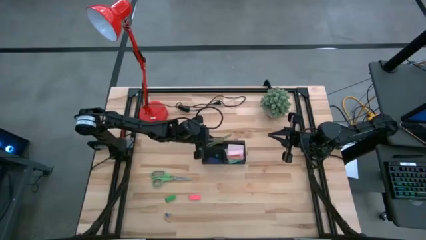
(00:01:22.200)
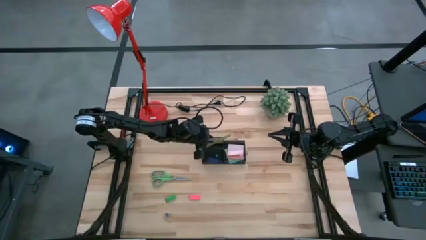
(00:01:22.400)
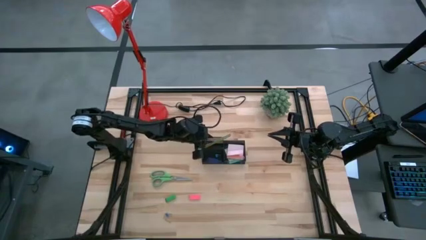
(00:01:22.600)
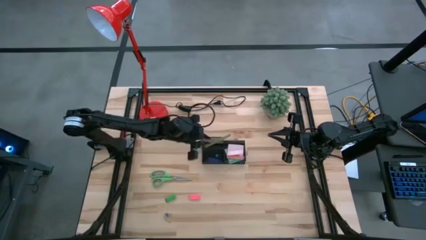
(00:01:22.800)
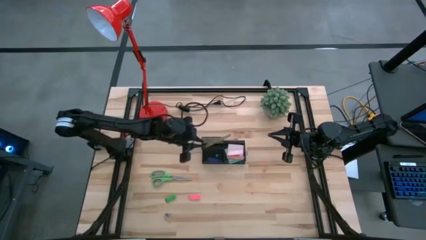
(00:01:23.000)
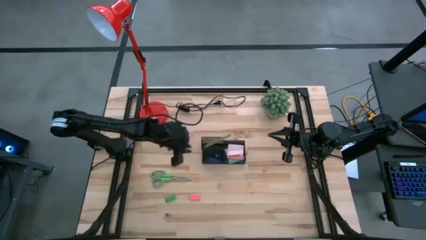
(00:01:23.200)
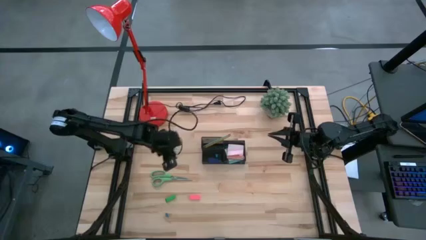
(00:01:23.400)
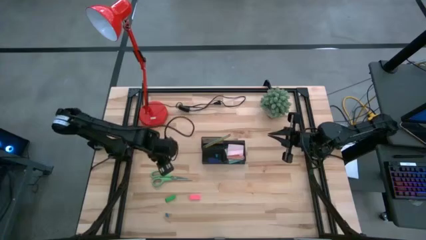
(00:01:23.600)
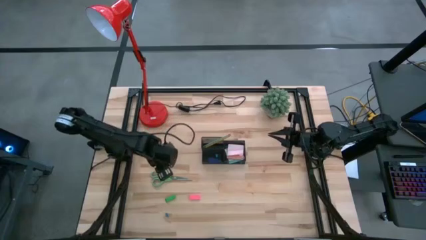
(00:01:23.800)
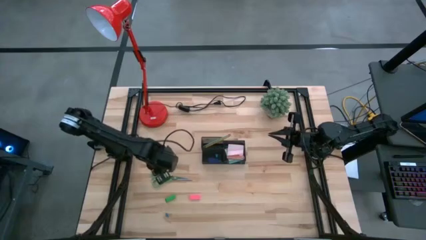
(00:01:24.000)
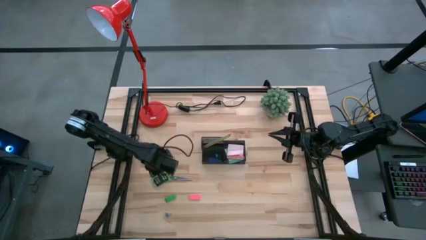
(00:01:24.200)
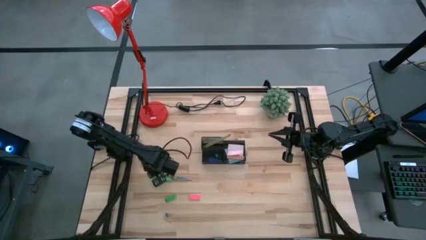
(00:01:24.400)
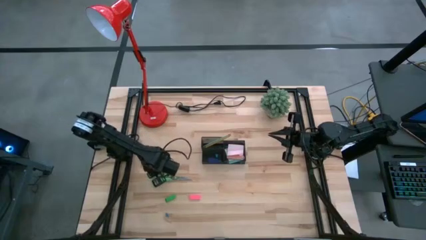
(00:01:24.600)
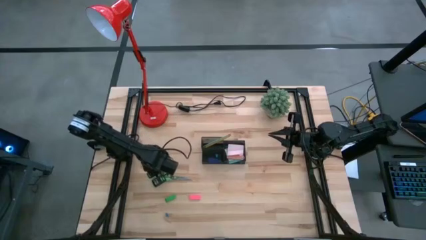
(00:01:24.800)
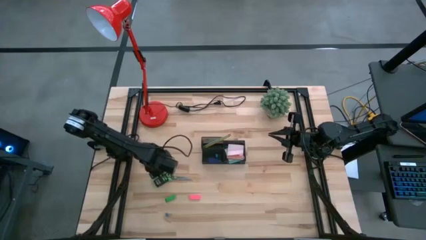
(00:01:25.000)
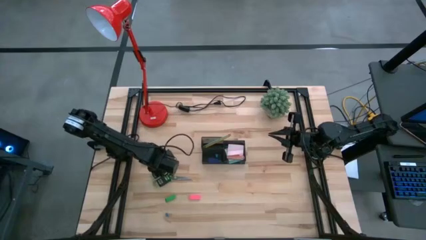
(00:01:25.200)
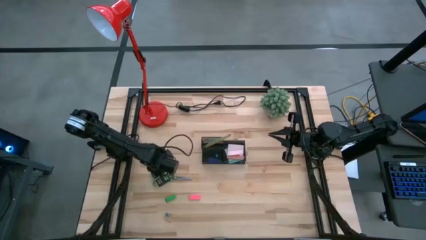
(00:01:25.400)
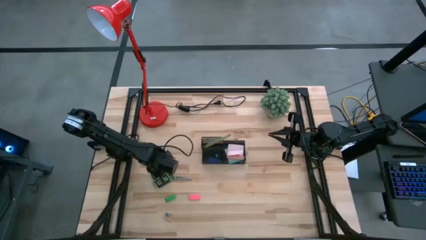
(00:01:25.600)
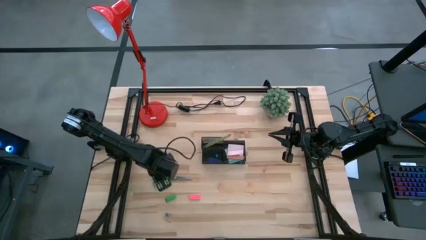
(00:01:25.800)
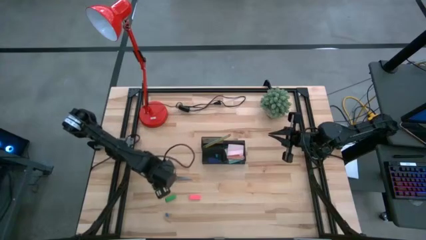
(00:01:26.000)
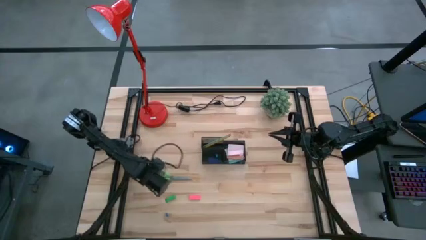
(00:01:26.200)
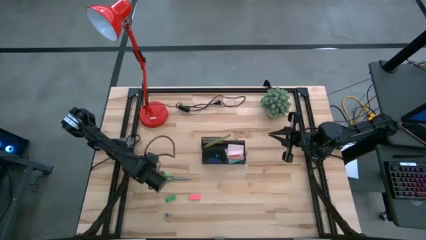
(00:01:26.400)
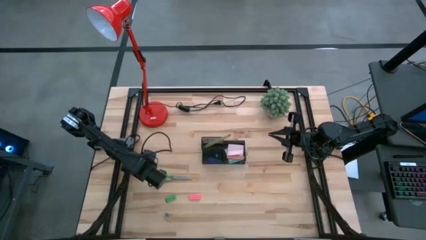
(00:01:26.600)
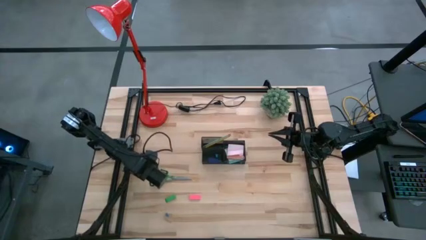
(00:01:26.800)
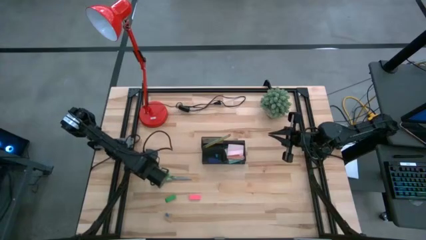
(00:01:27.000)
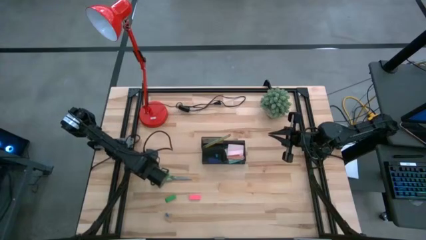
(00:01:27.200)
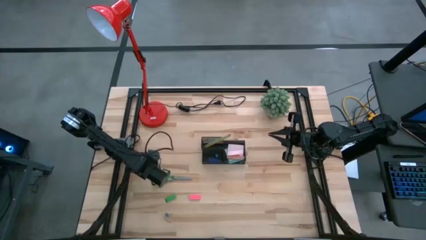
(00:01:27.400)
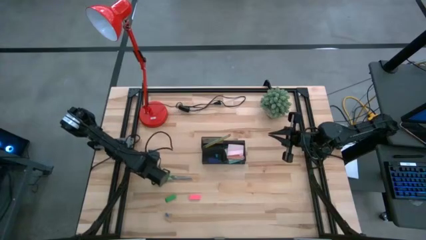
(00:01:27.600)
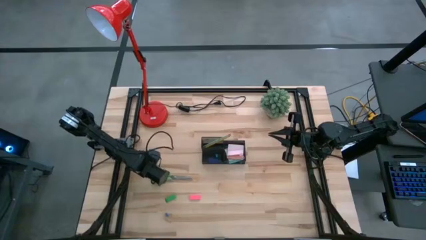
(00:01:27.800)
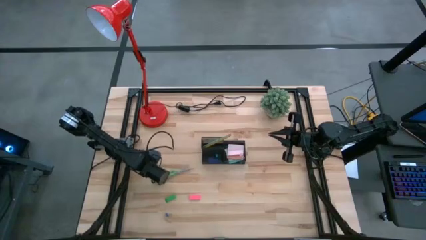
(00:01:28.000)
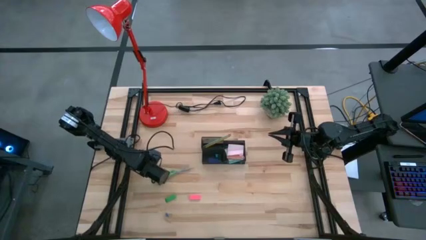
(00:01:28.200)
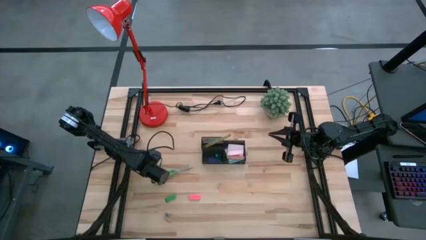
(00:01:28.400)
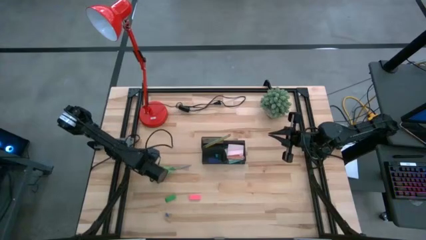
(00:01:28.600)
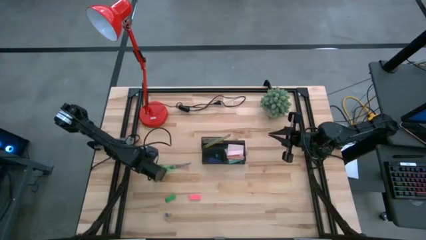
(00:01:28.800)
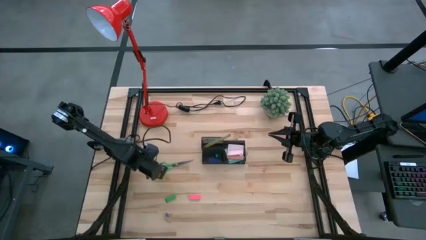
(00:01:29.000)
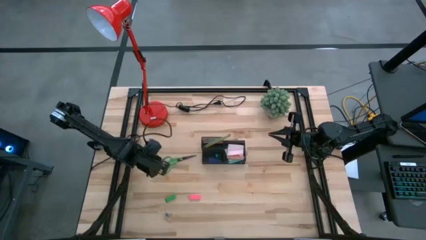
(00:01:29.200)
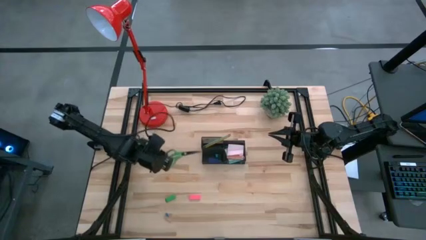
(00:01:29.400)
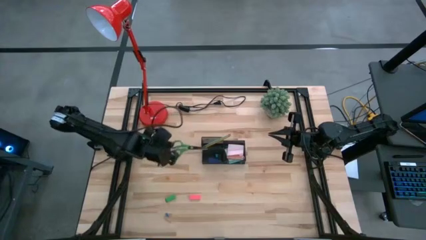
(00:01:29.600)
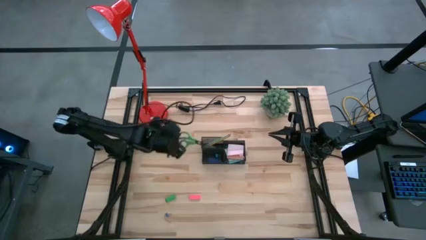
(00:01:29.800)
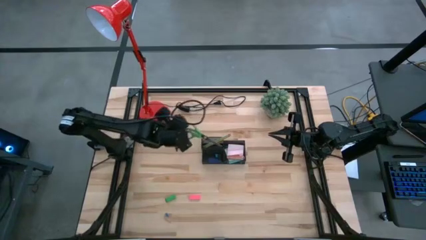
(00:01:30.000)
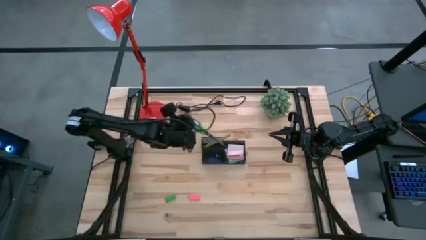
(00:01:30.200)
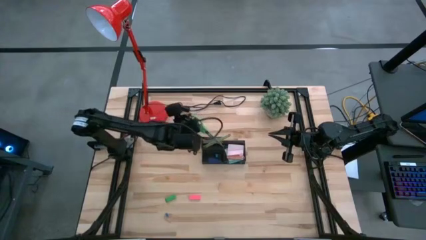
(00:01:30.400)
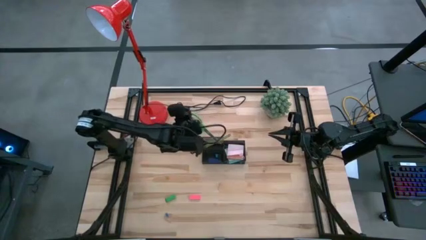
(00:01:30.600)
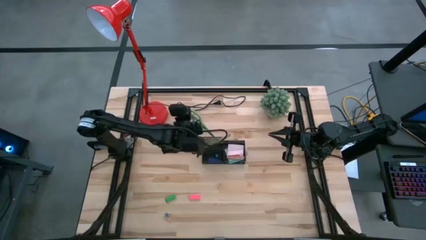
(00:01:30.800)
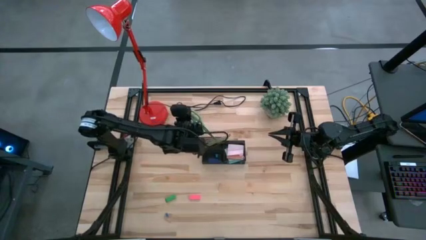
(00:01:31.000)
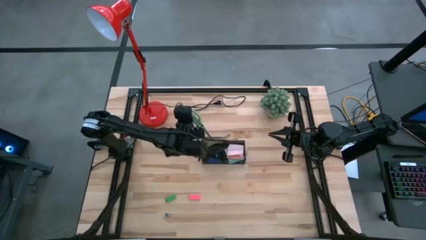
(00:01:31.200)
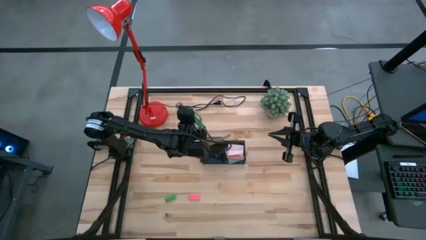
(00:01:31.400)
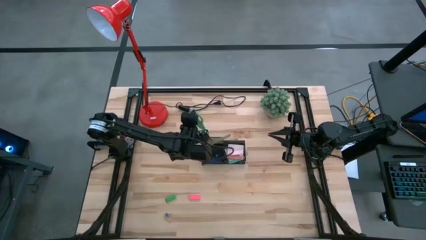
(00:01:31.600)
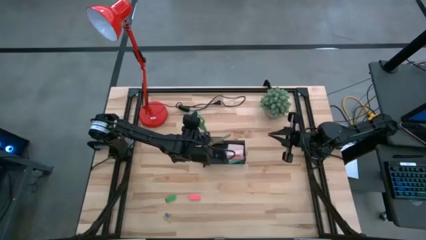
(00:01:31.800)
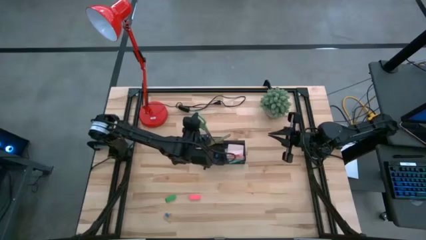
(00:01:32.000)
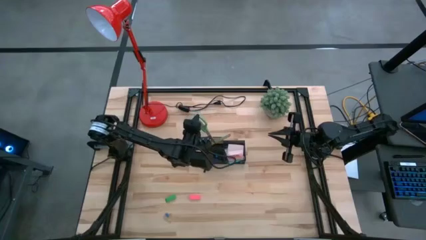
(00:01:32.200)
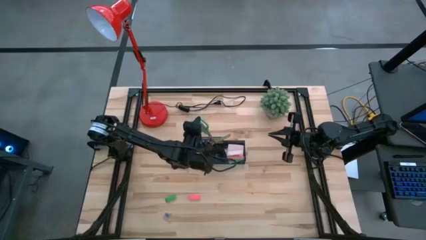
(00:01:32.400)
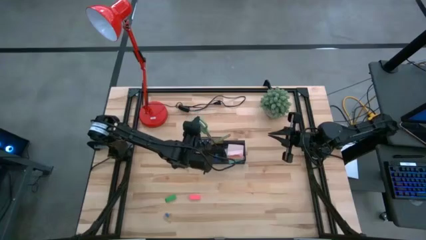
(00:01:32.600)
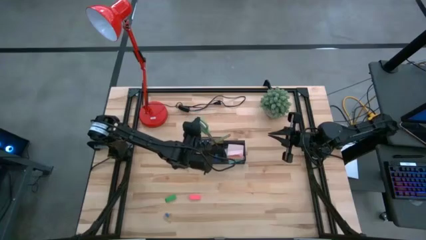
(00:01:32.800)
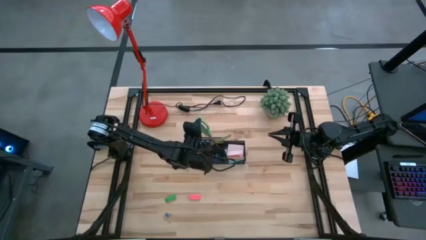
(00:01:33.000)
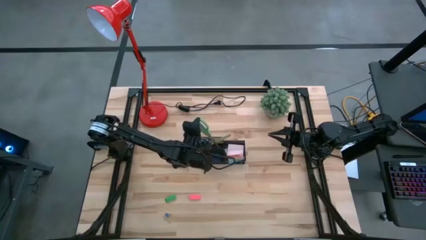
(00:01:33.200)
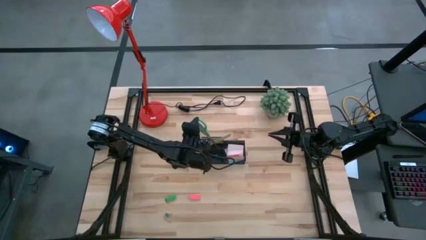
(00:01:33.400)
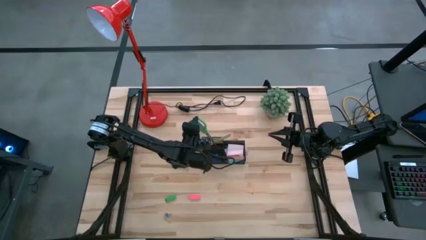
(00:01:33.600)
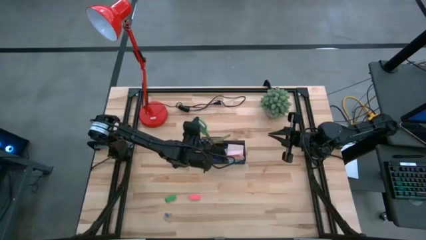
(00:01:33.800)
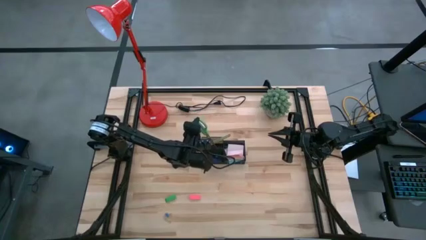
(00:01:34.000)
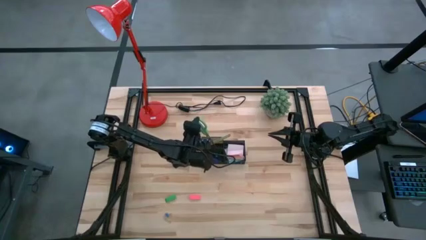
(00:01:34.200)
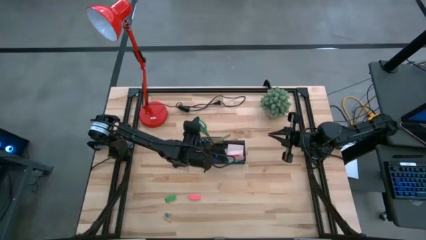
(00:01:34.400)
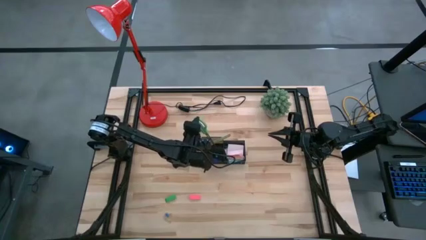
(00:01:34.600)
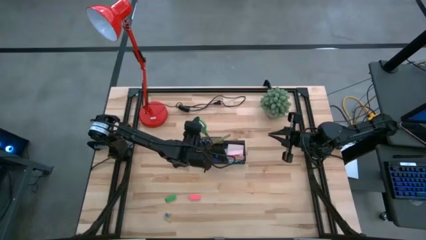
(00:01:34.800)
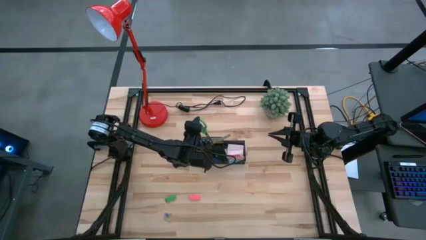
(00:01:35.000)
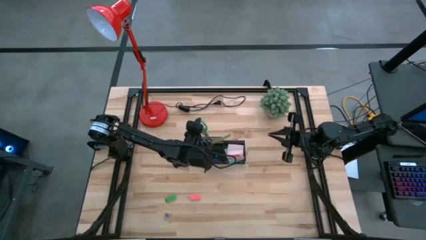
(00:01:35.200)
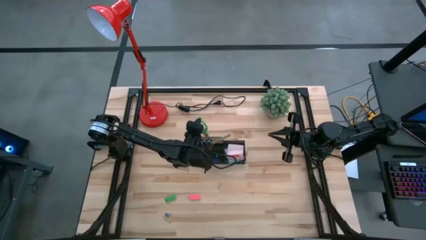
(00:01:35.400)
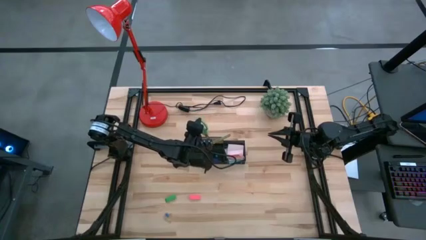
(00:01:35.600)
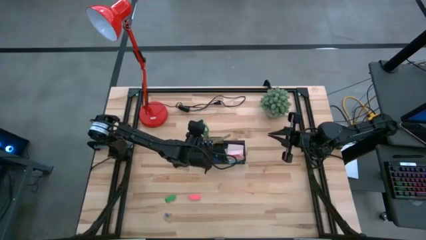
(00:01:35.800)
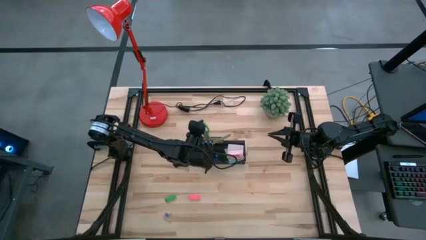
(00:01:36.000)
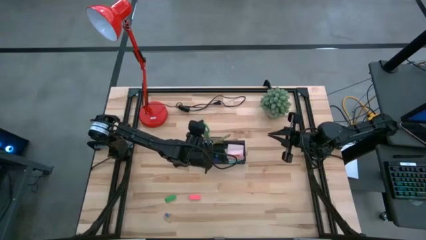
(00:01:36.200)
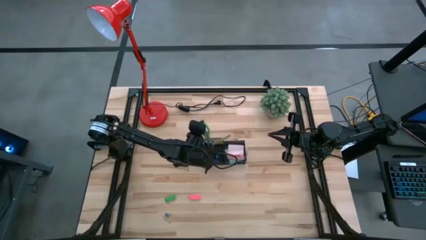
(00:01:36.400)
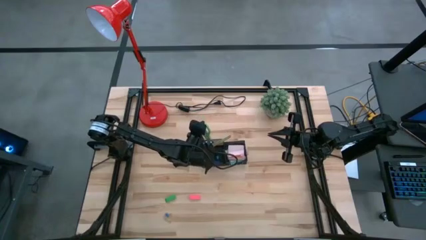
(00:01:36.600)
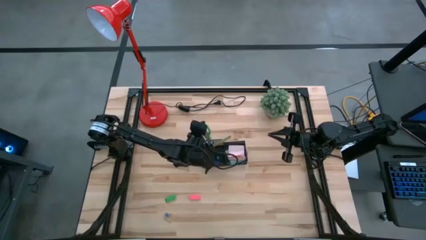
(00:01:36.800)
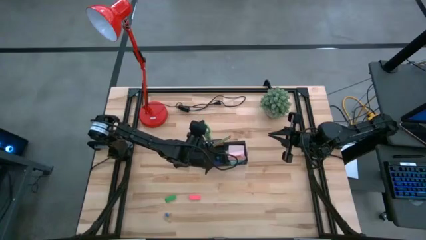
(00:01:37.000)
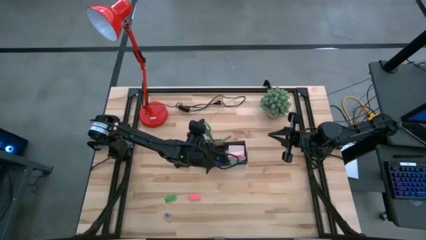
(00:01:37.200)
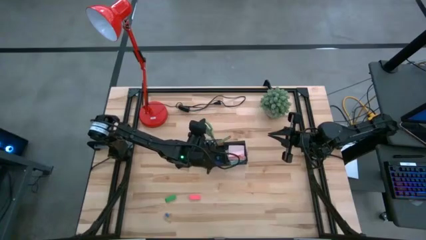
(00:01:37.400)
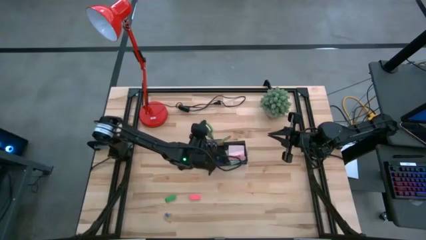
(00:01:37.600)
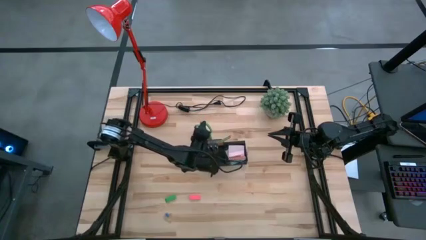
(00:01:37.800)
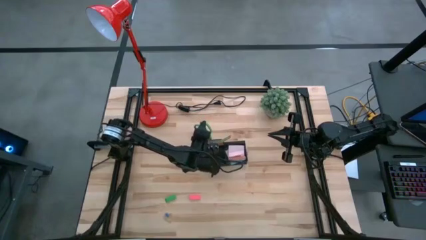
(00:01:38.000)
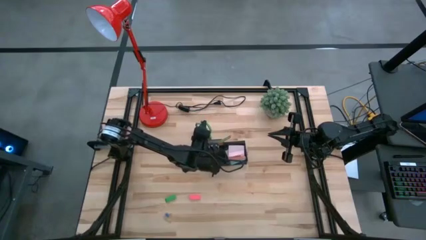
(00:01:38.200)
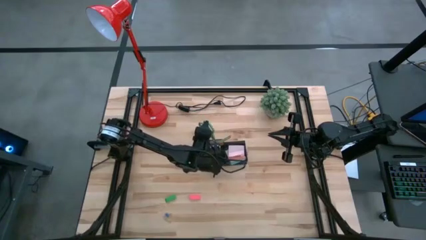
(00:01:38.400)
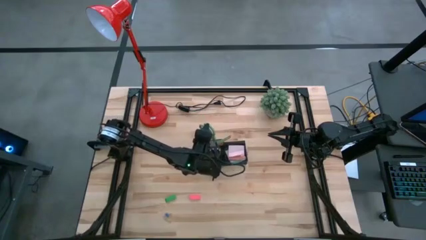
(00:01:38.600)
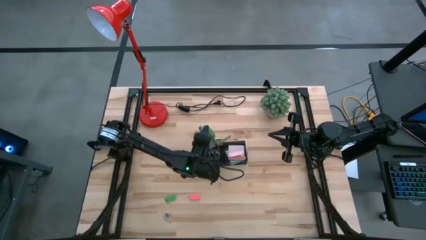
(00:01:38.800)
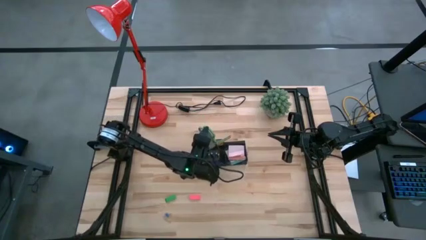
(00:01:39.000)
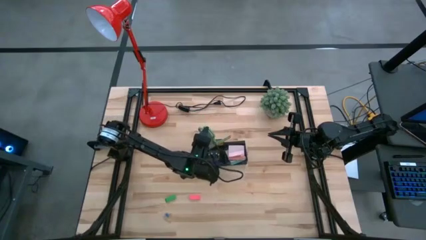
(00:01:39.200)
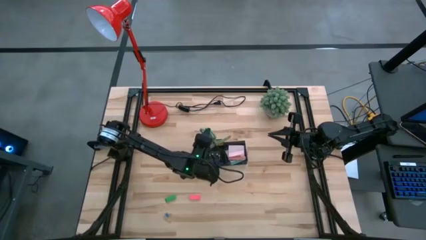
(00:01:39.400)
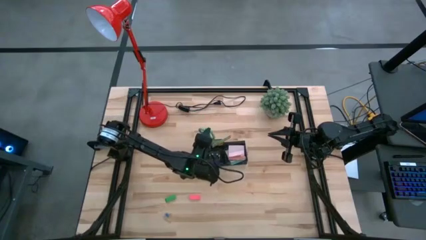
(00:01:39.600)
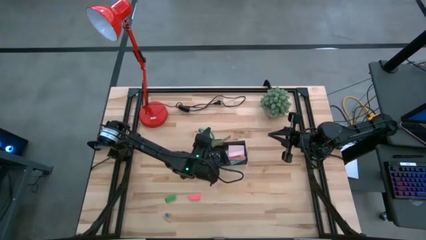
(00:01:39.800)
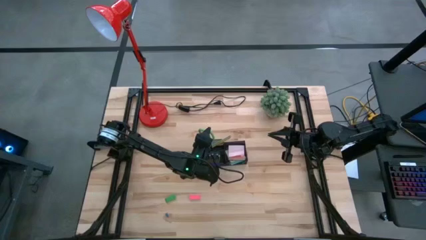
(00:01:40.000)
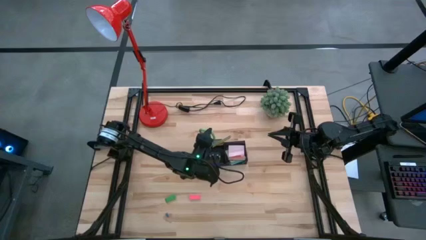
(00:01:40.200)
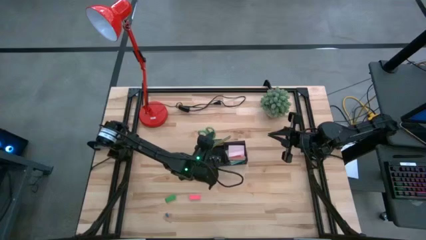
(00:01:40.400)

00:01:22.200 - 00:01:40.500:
Task: Pick and place office supplies into organizer
Put the green scissors into the black desk organizer
